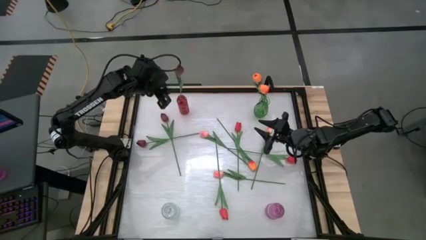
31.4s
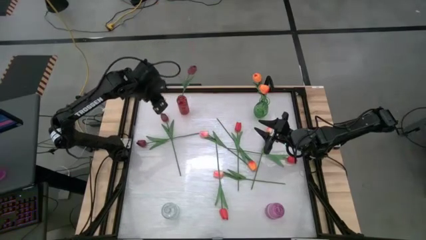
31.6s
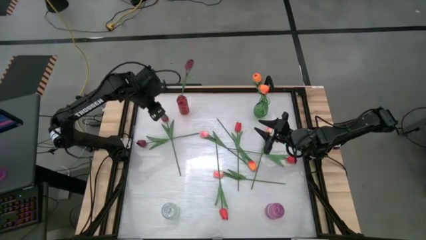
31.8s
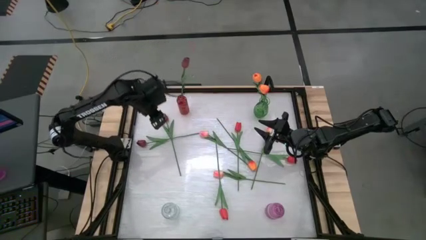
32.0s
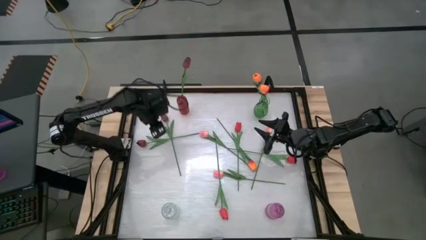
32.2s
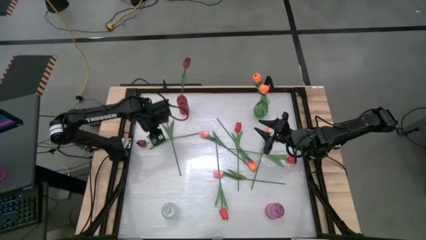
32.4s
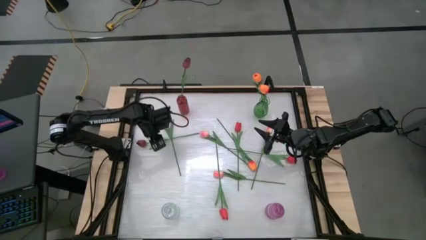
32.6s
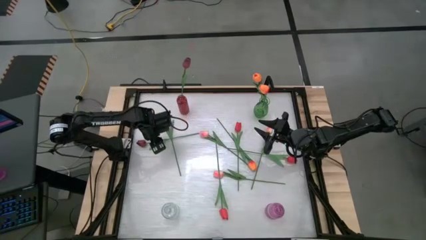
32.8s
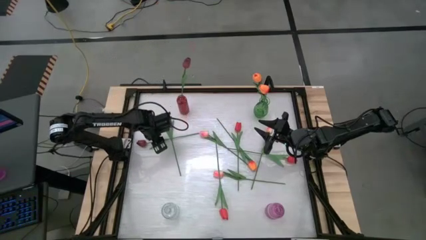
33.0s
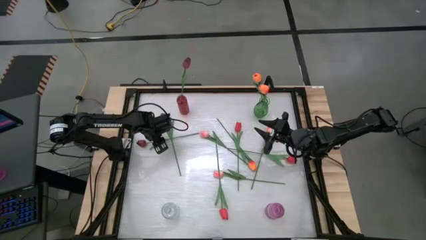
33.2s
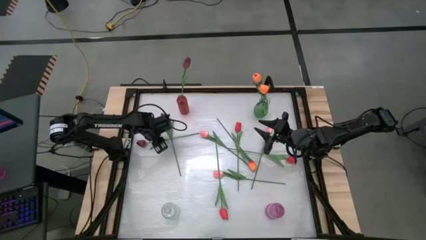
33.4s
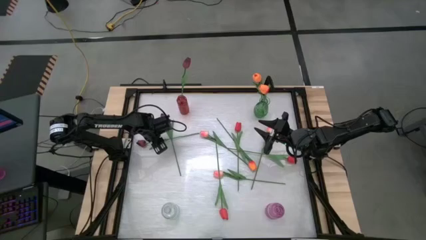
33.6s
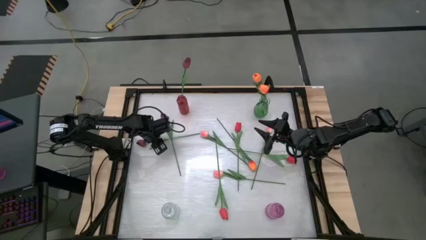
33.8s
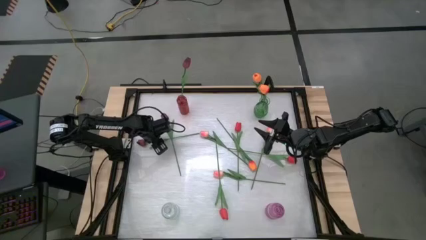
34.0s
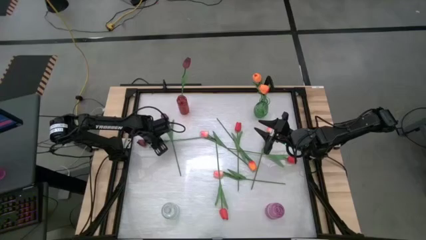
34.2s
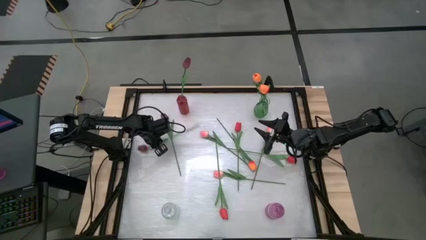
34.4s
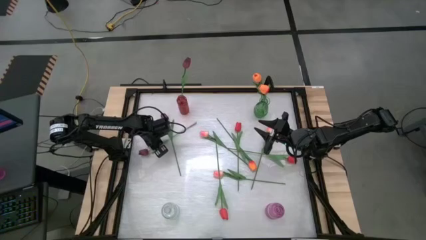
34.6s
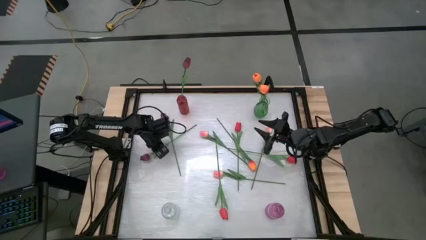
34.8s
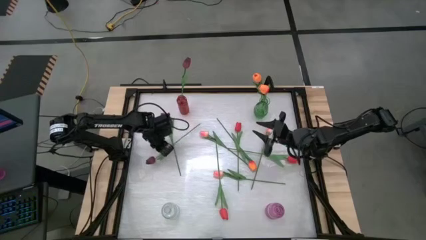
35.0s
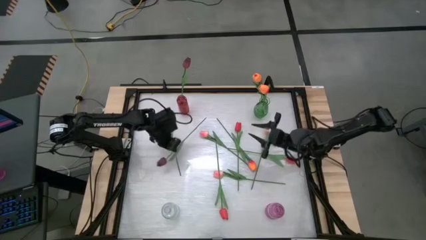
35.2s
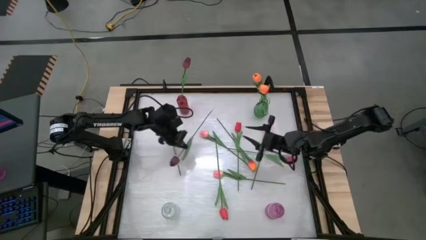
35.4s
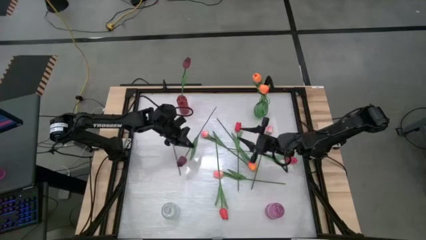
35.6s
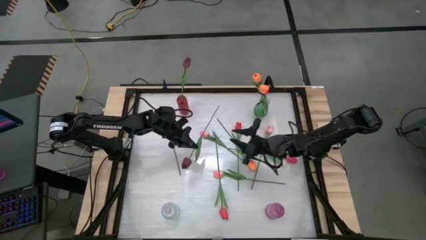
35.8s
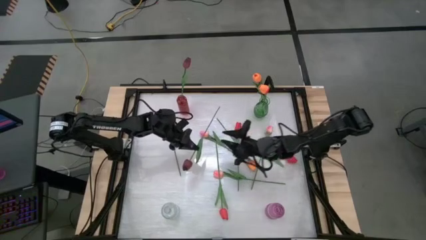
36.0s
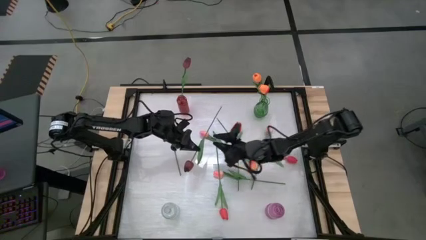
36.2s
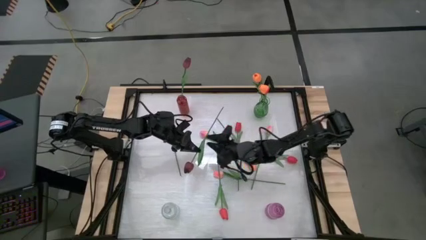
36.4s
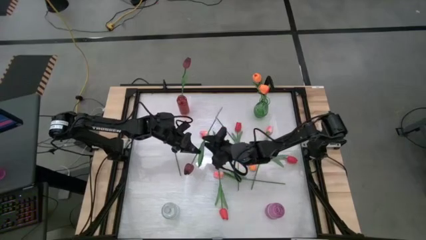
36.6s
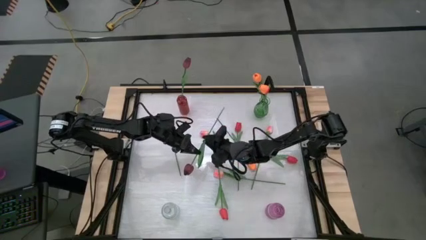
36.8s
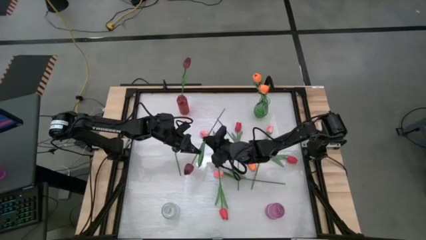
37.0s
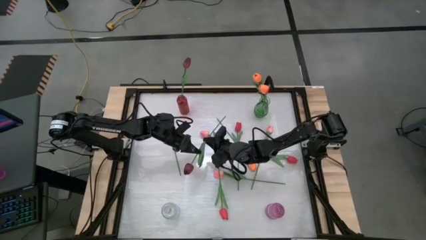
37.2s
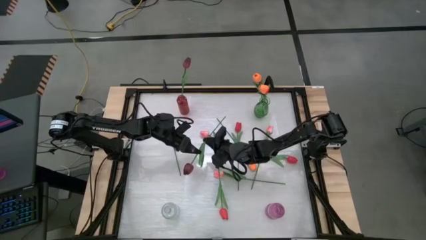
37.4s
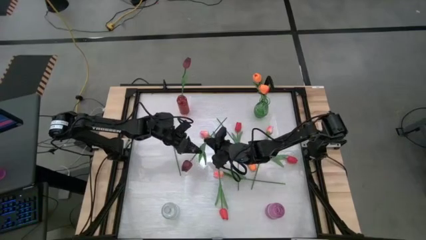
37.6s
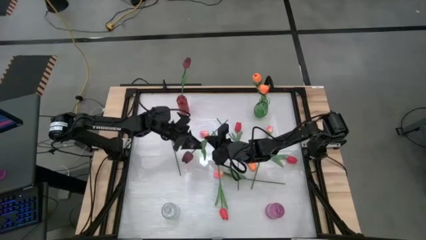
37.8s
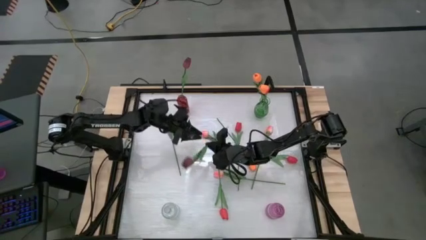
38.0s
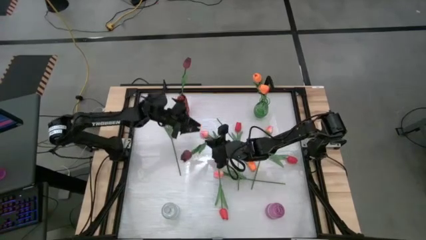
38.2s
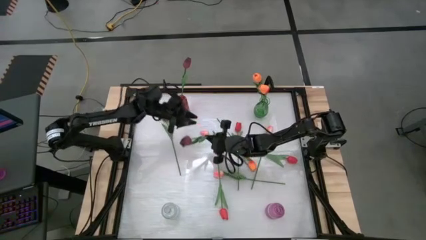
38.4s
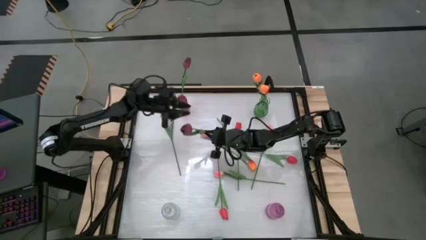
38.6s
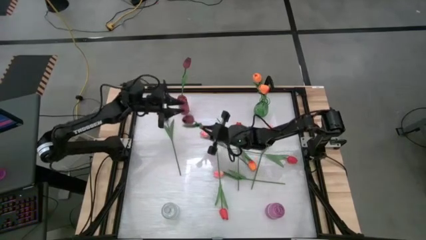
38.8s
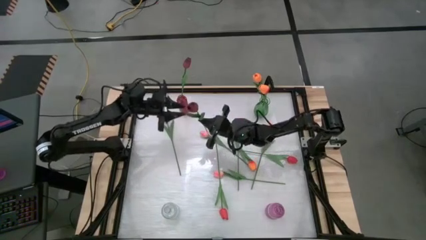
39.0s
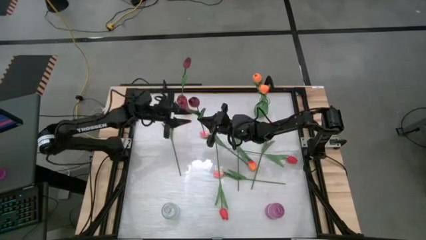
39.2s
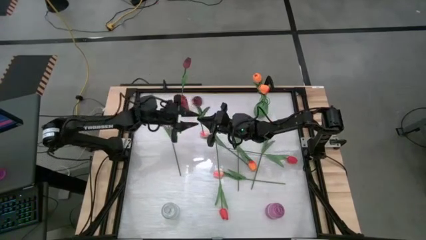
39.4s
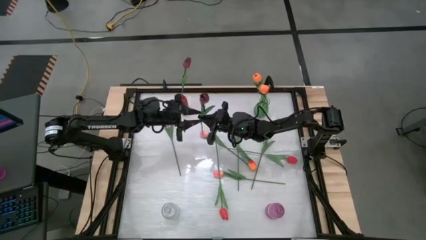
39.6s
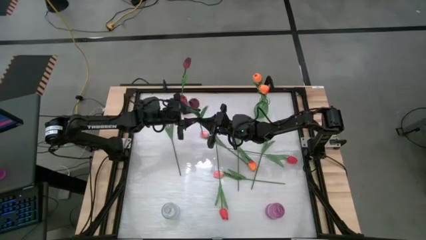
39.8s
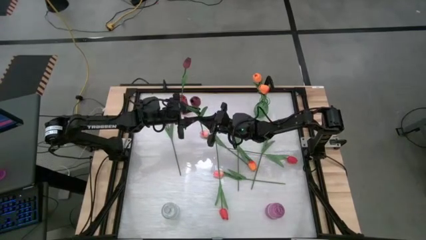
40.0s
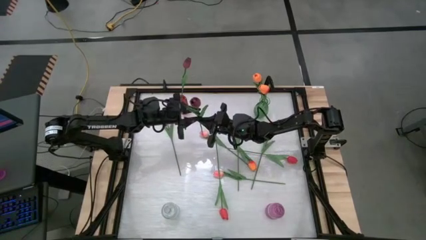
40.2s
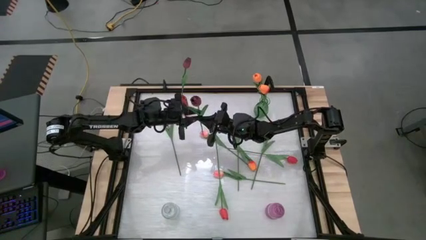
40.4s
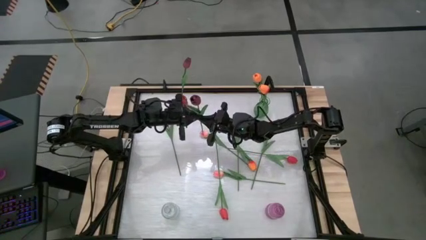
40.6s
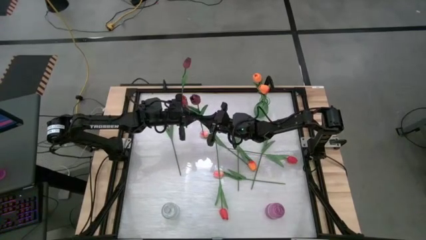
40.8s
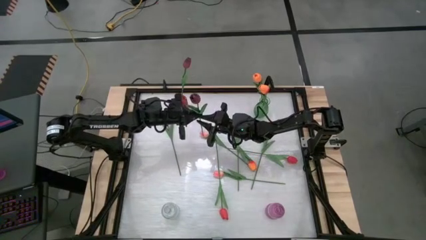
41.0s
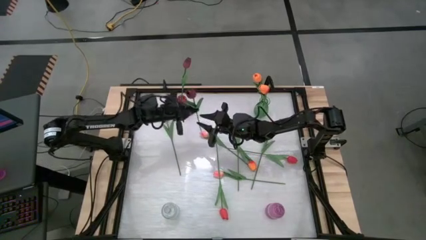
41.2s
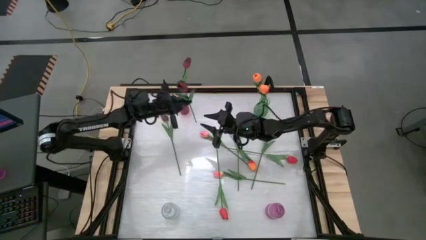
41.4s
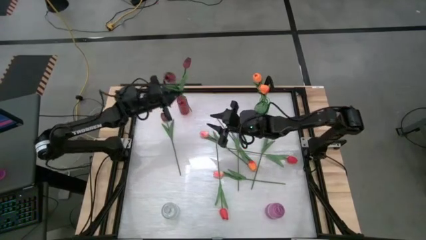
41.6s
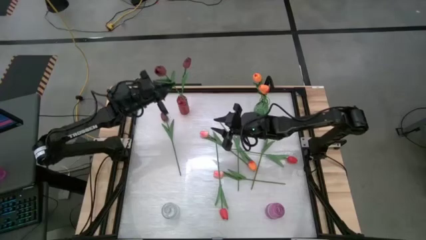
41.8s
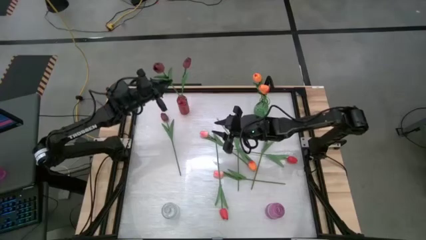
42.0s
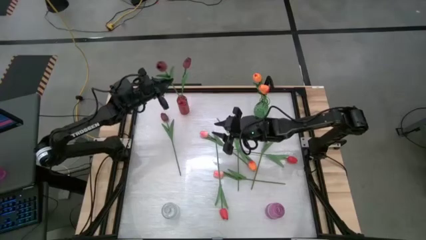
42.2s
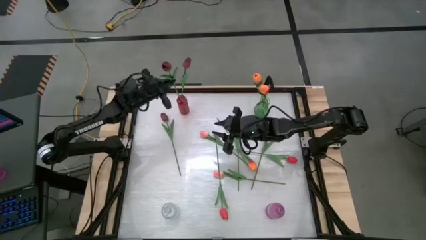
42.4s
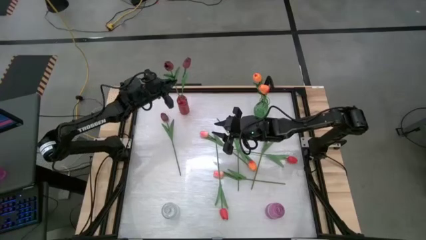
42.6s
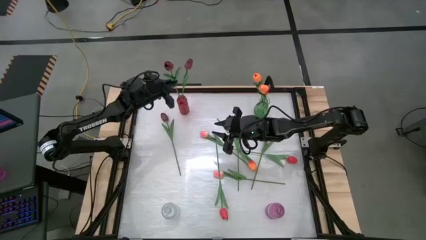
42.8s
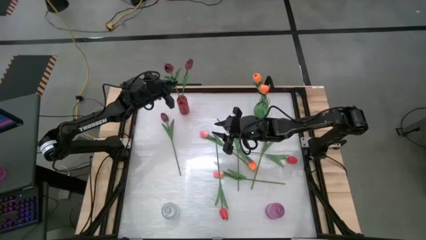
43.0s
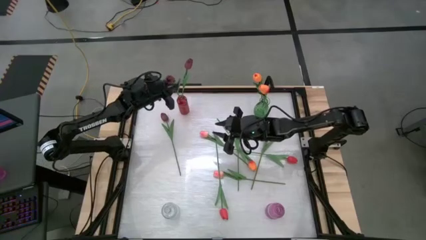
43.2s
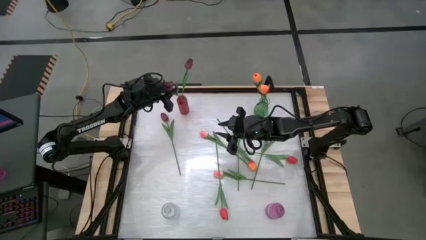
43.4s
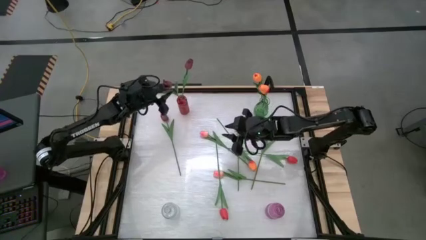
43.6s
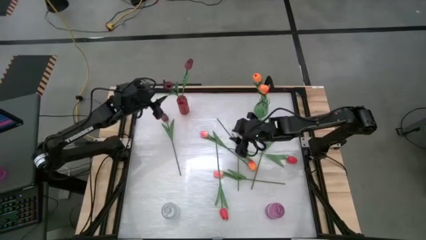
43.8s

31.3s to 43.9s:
Task: Sort flowers into vase by color
Put the dark red flower into the red vase

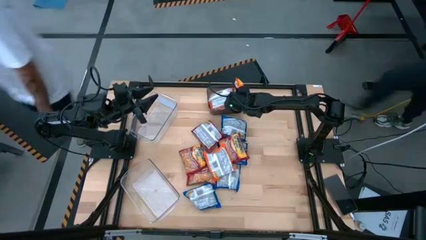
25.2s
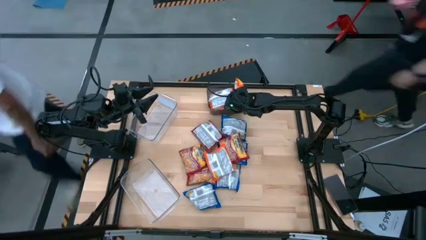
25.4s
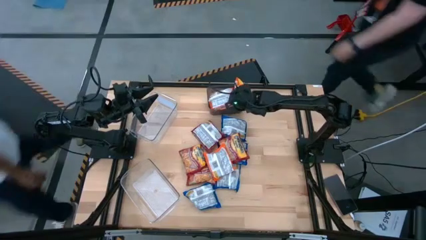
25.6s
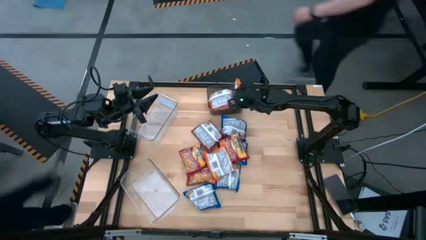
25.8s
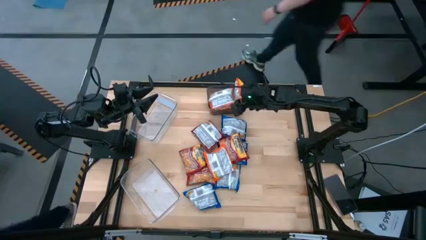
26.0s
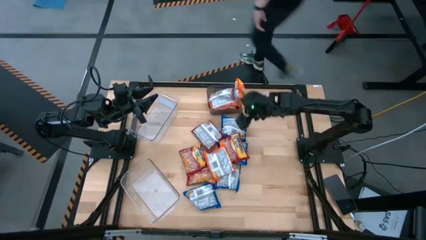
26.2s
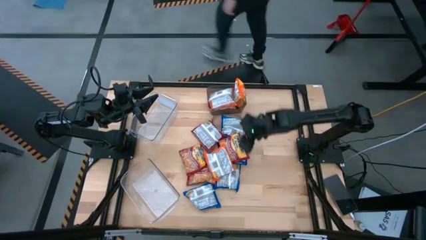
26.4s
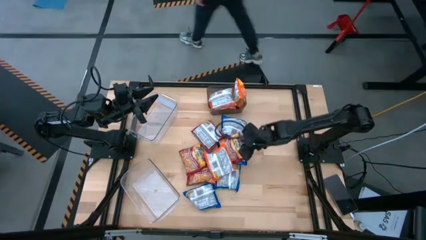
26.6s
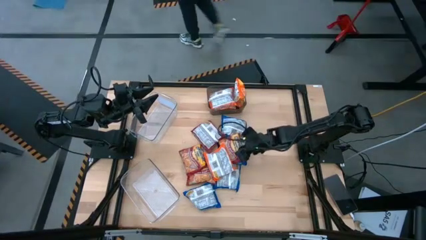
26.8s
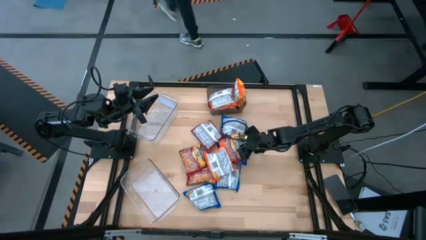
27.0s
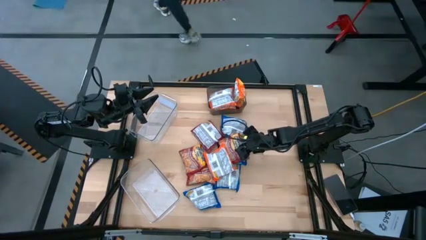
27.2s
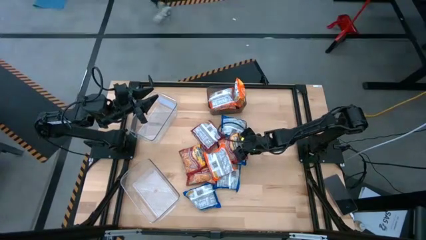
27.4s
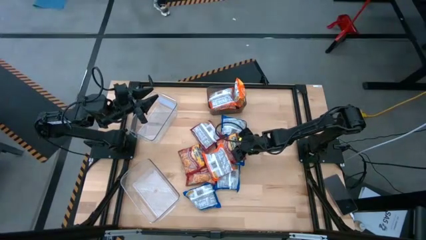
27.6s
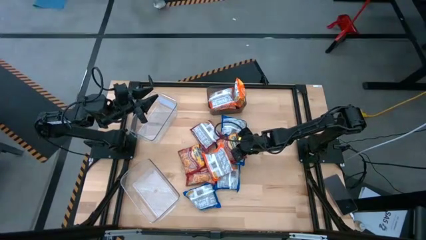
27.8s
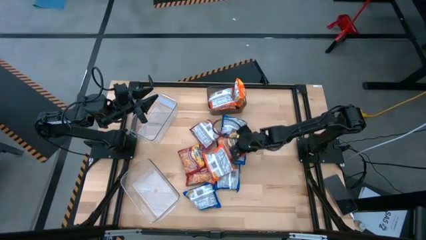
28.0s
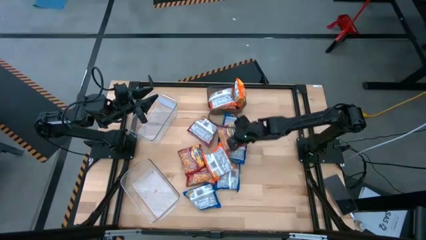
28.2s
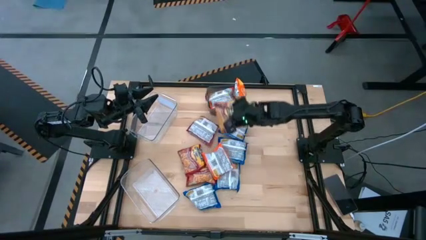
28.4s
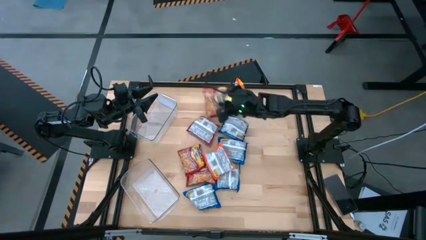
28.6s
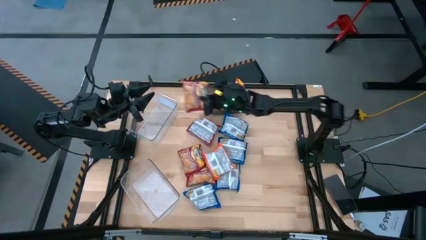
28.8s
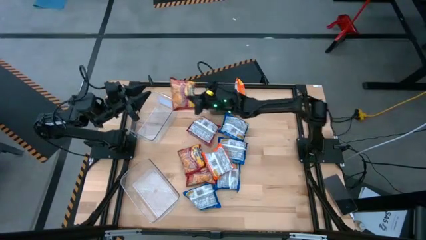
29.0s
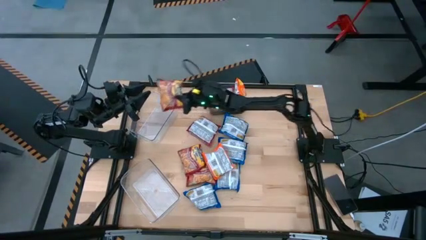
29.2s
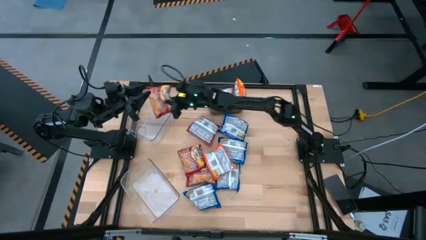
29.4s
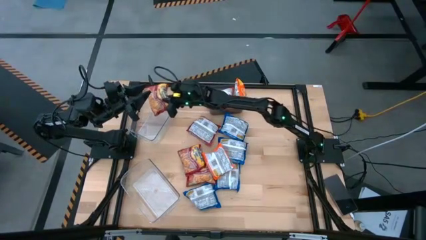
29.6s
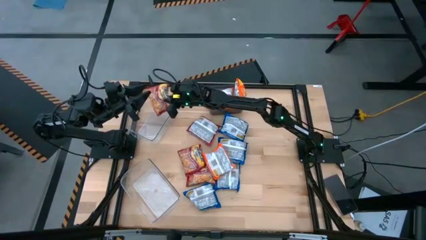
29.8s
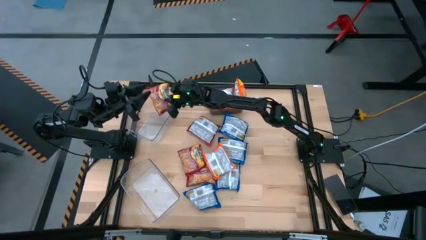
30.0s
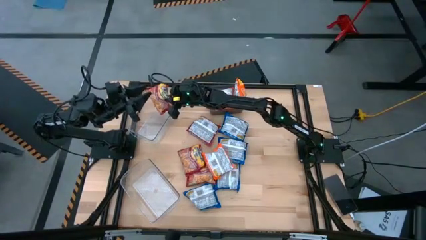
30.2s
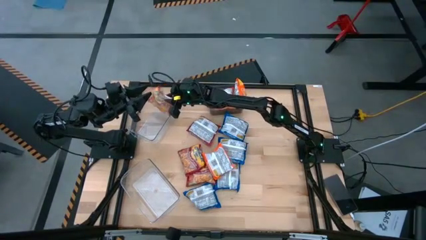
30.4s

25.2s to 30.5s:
Task: Sort Maruchan noodles
Put the right red noodle pack into the top transparent bin
